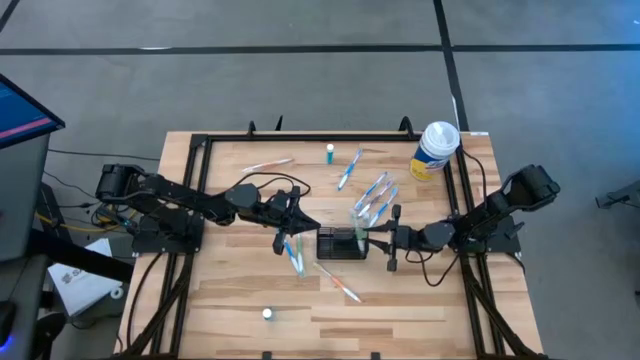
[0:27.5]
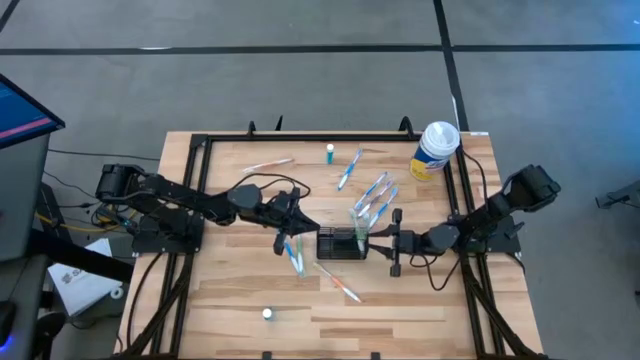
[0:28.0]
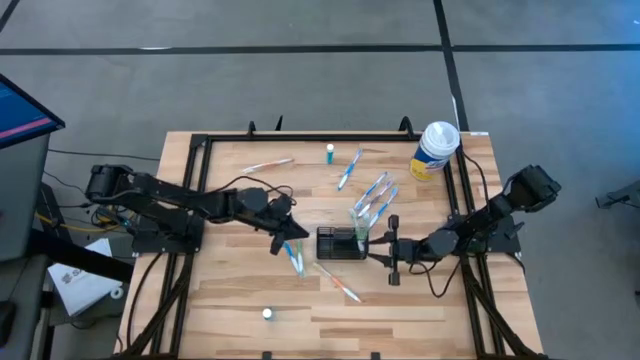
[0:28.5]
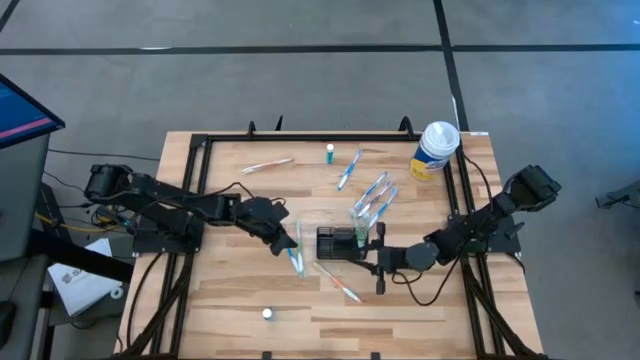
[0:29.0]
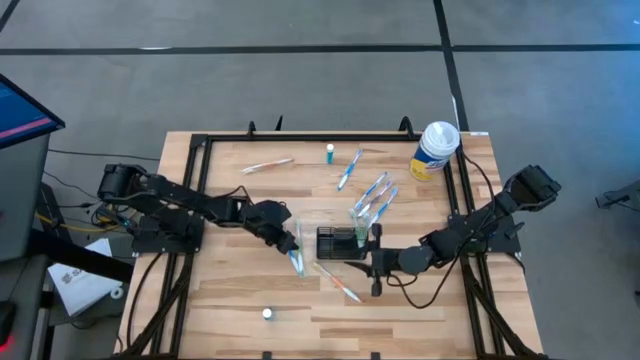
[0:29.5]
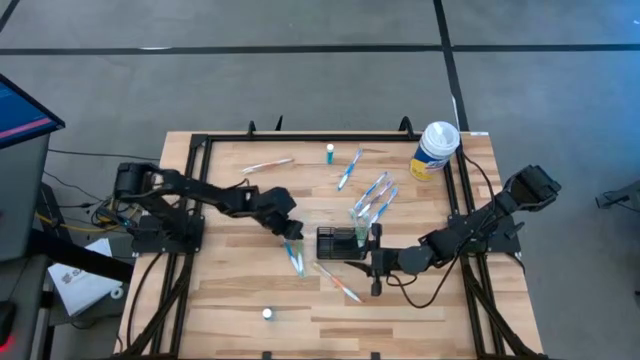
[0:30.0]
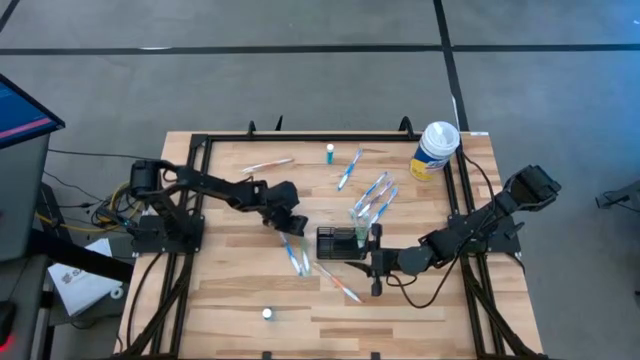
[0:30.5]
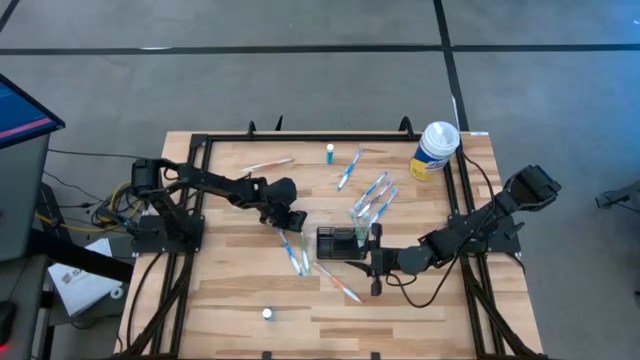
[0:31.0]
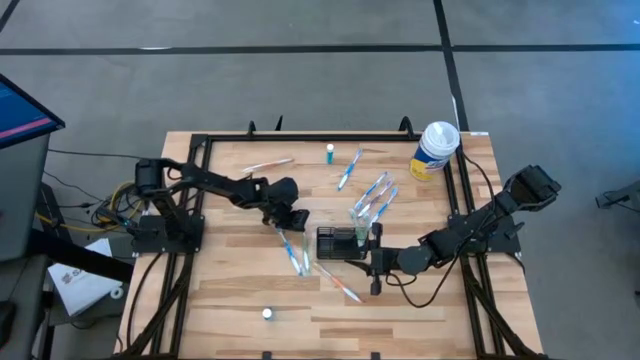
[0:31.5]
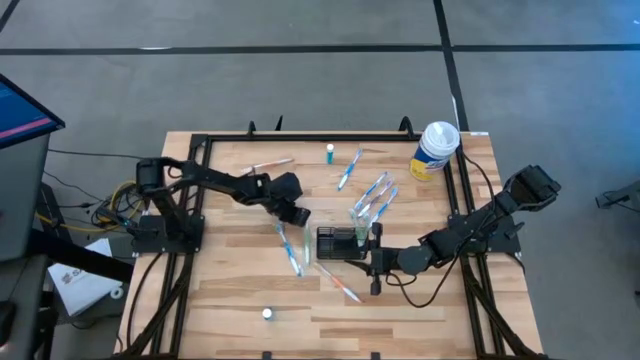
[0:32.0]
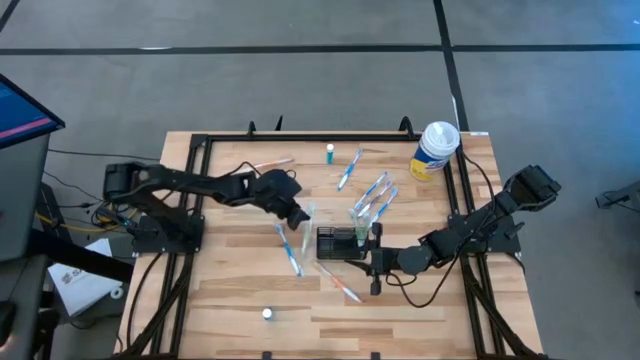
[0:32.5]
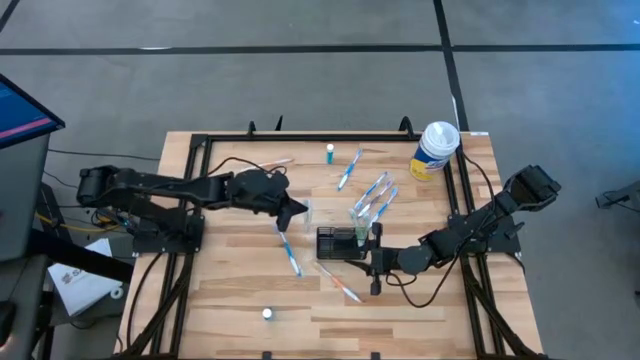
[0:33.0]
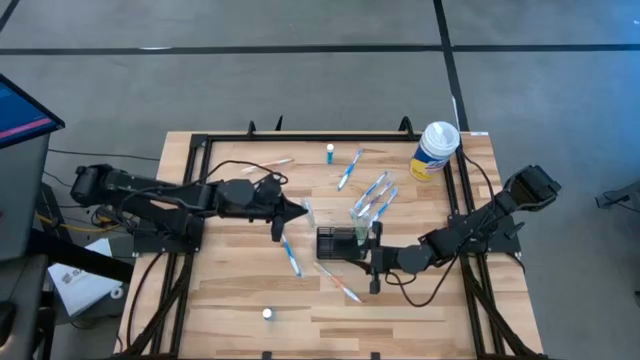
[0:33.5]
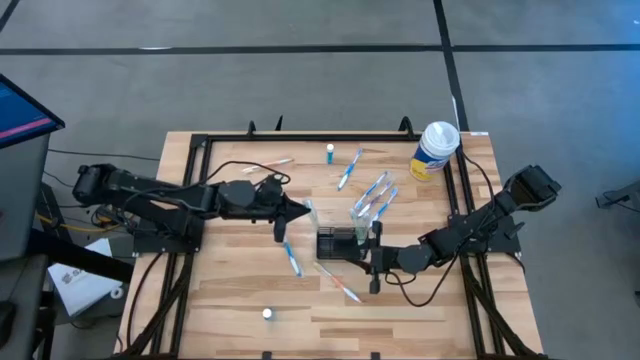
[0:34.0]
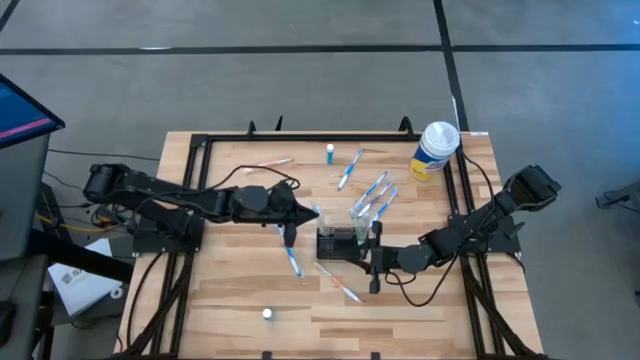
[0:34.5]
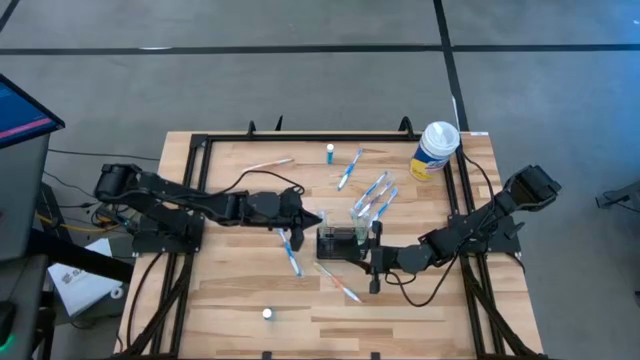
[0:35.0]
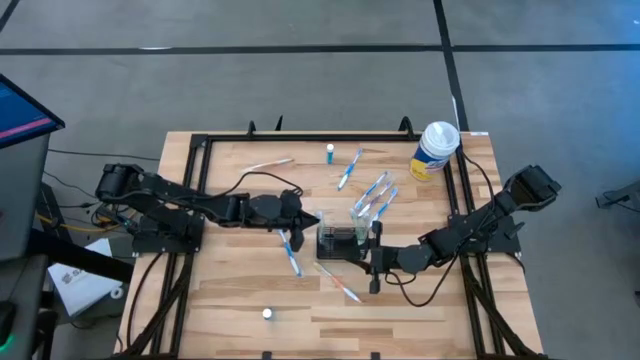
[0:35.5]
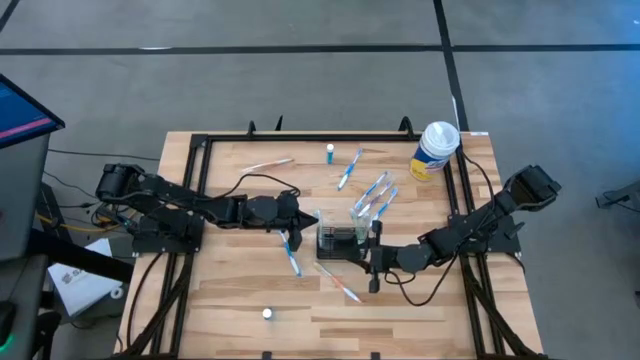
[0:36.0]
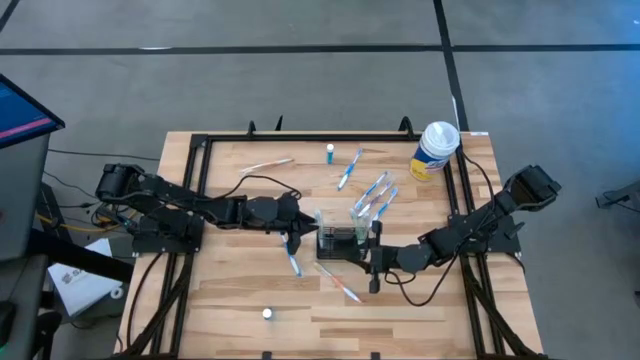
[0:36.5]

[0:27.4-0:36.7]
Task: Pick & Place toothbrushing station
Put the green toothbrush into the wire organizer
